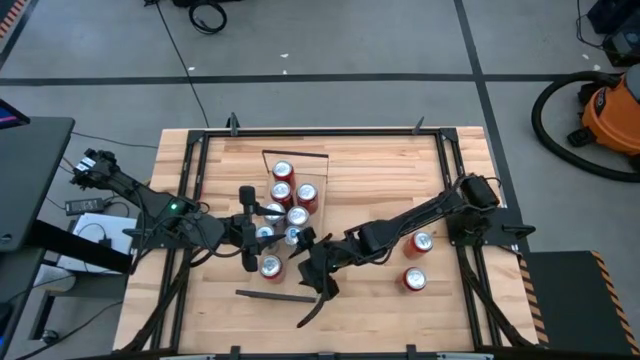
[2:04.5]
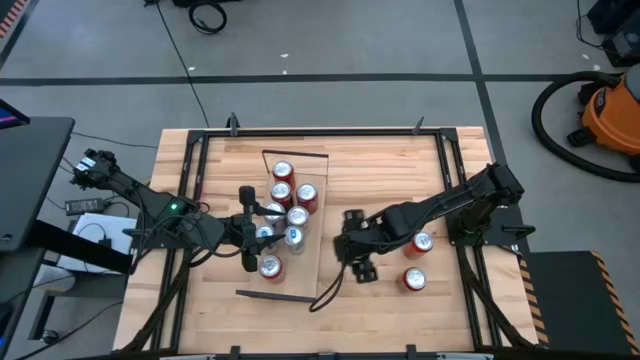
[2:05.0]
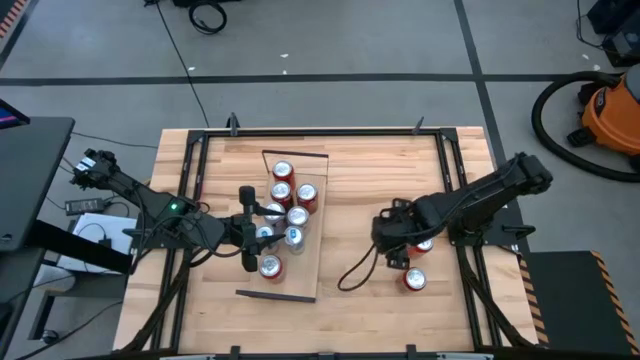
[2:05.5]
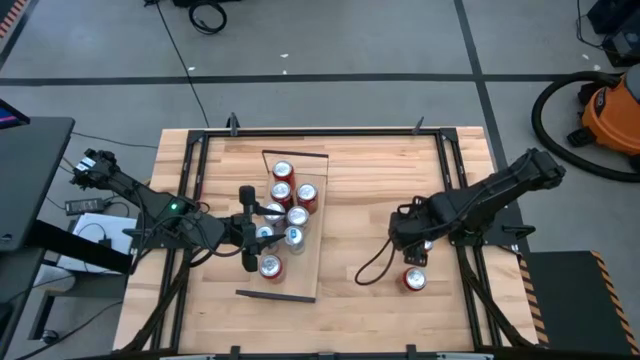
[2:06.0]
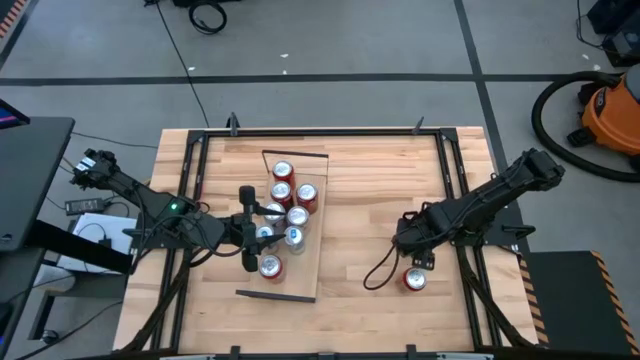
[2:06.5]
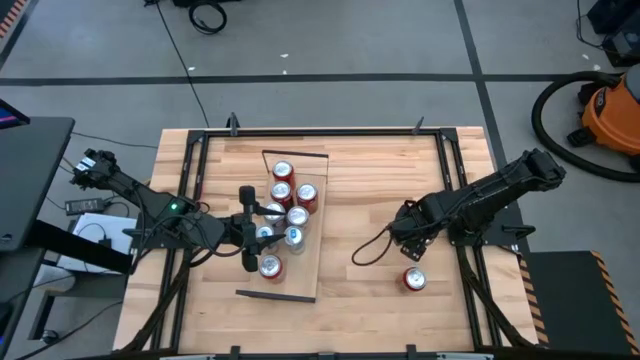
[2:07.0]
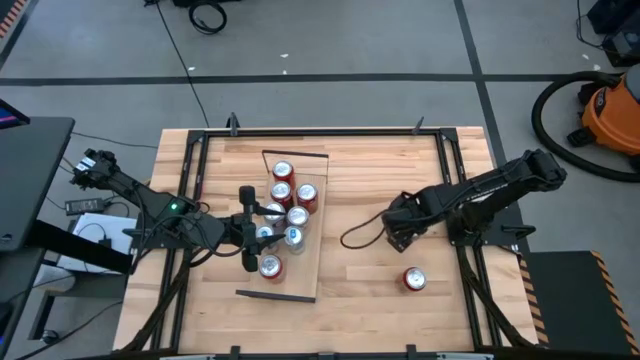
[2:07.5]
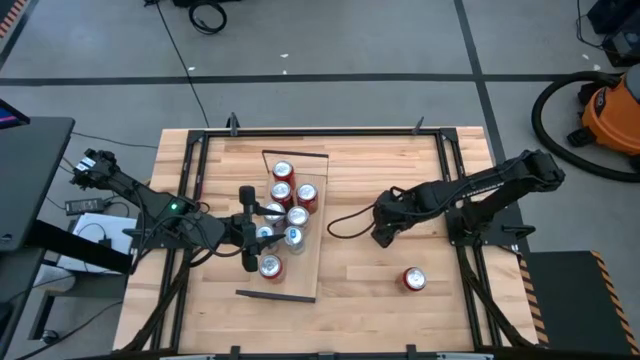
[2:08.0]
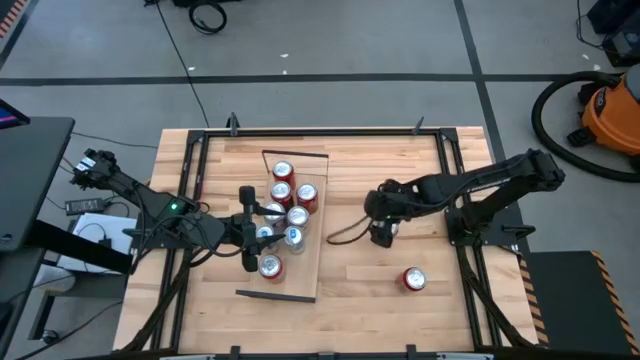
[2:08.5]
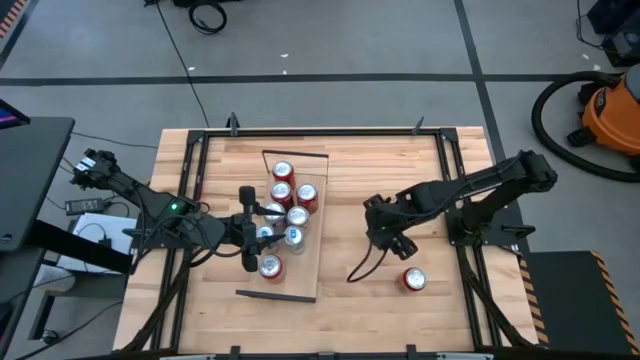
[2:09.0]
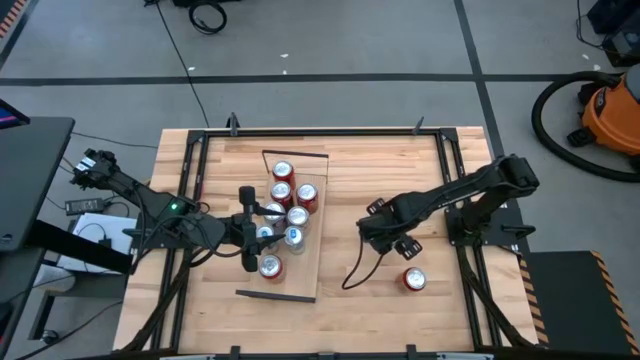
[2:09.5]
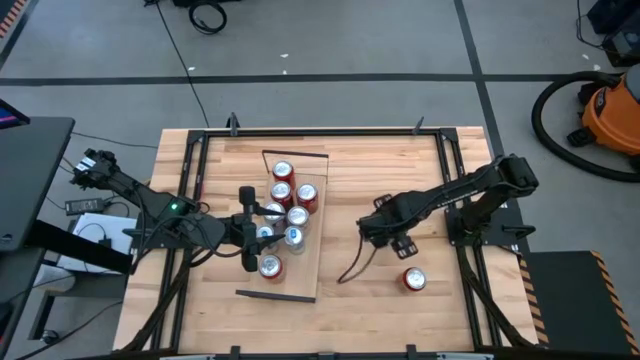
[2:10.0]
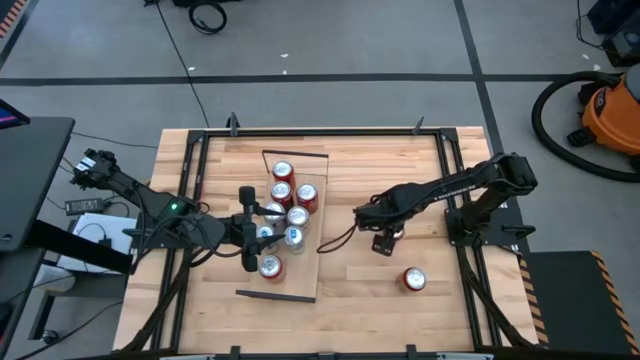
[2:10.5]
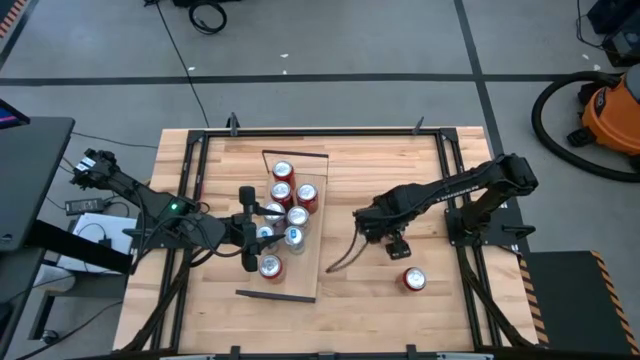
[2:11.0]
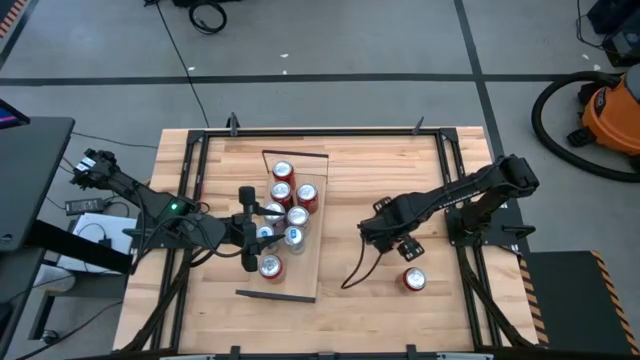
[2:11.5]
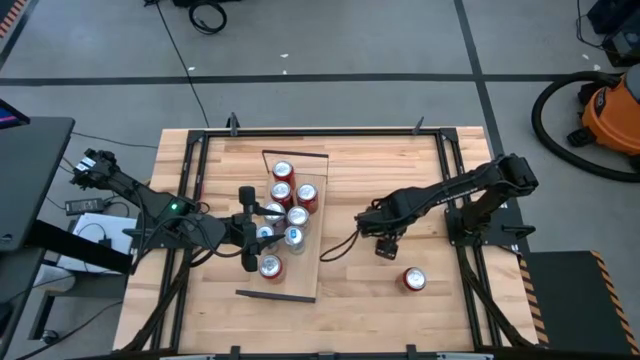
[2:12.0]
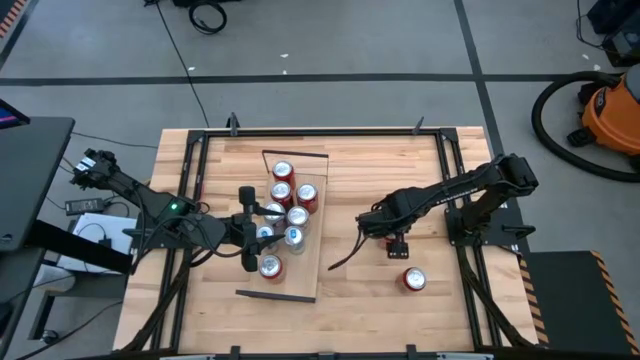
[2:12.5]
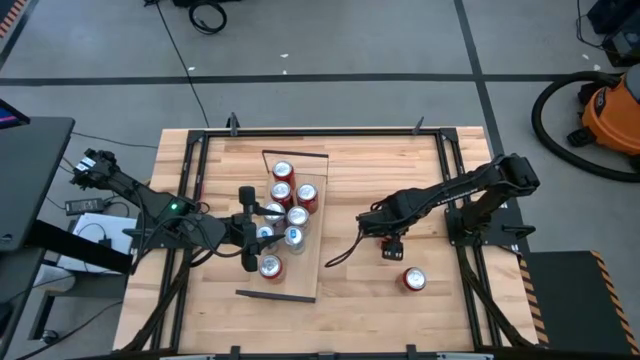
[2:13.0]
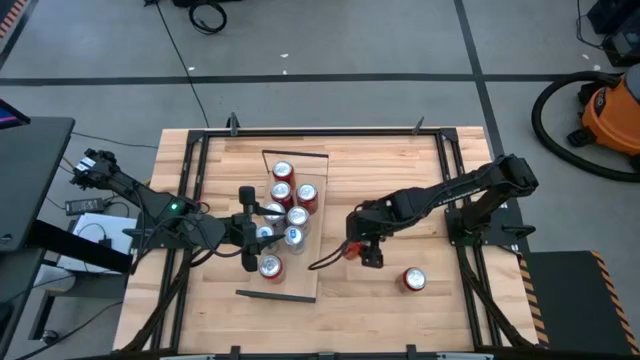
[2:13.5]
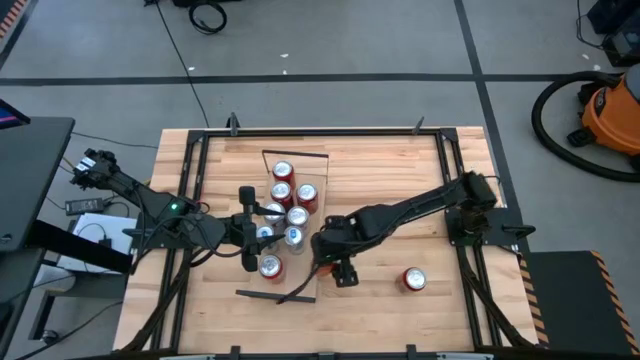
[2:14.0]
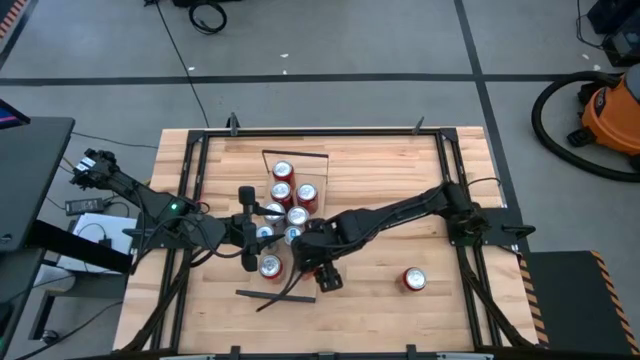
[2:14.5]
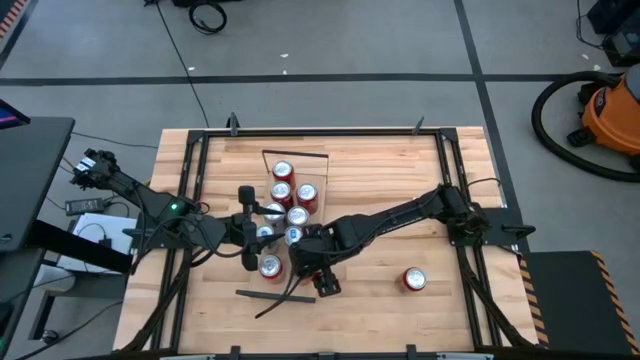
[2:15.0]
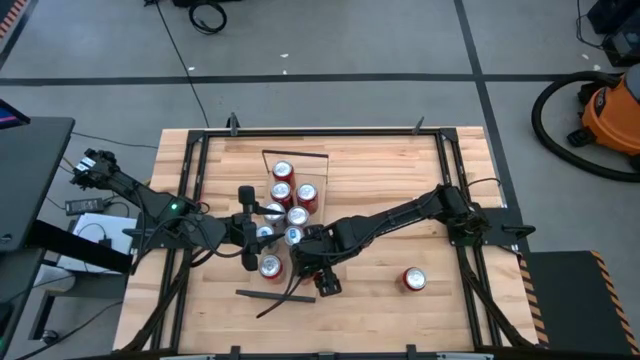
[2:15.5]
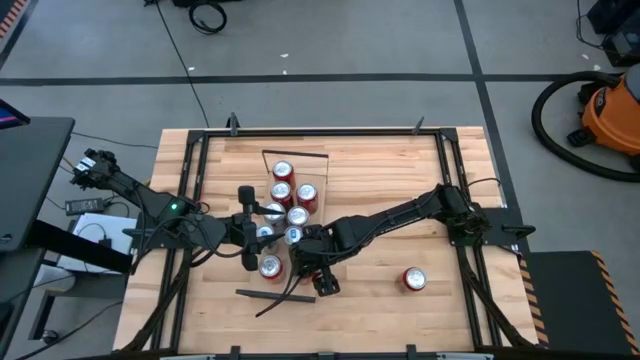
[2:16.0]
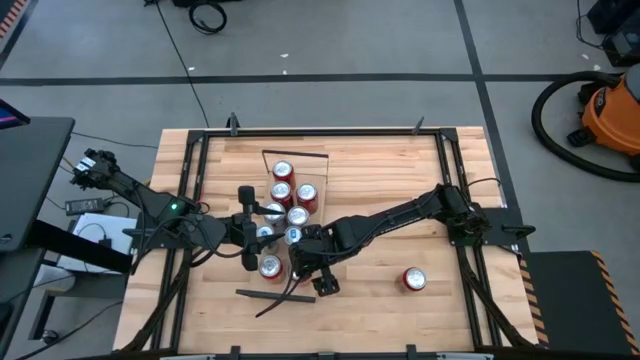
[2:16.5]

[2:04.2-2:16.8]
Task: Place canned beverage on shelf
Put the red soda can on the shelf aligned with the red soda can

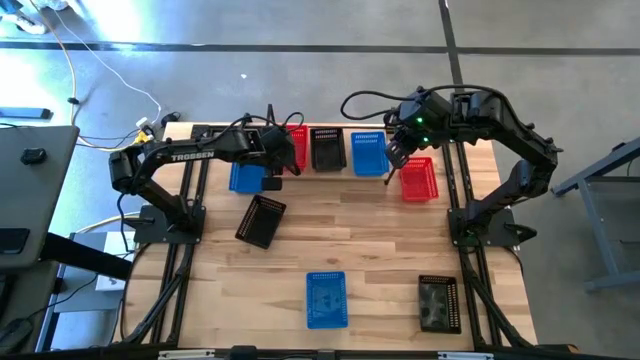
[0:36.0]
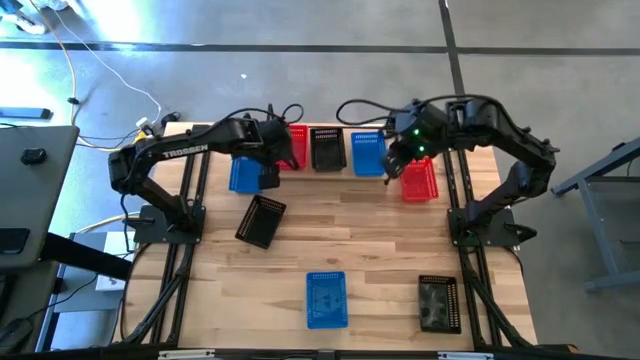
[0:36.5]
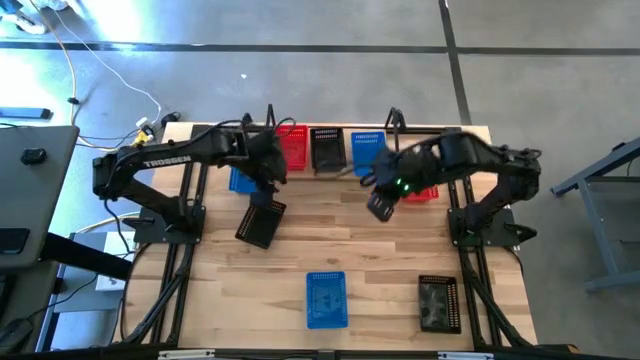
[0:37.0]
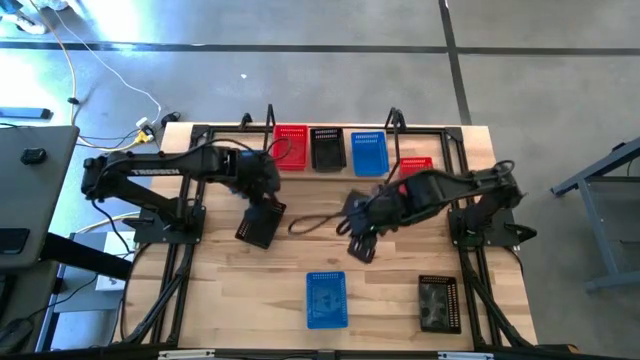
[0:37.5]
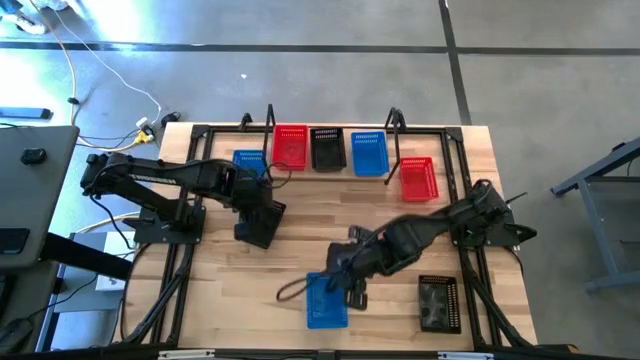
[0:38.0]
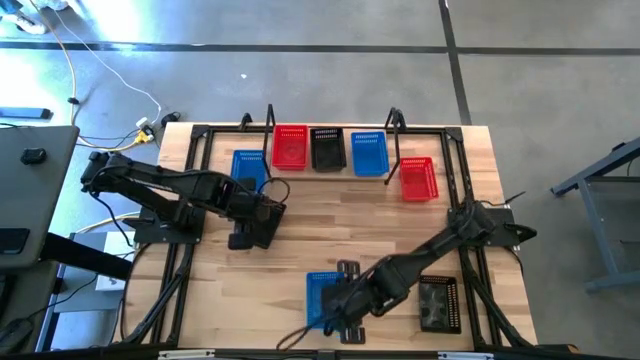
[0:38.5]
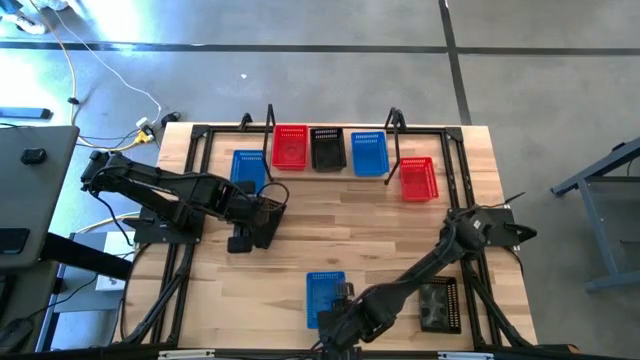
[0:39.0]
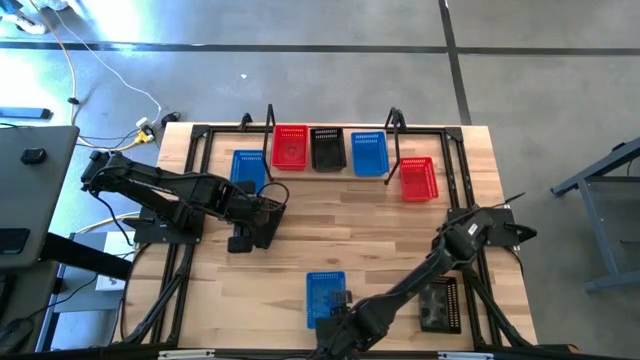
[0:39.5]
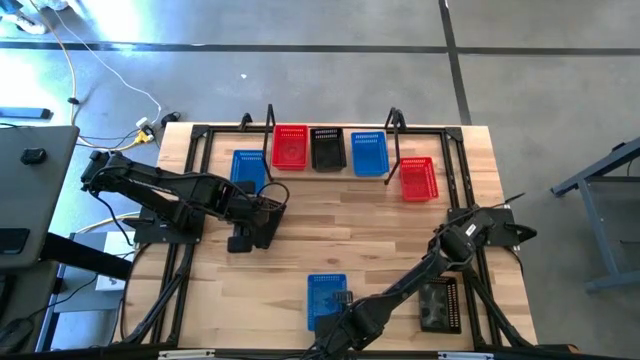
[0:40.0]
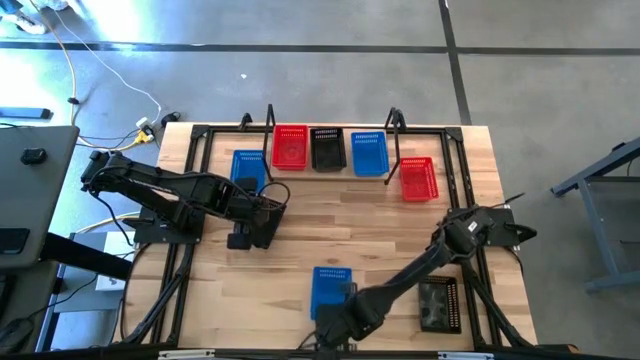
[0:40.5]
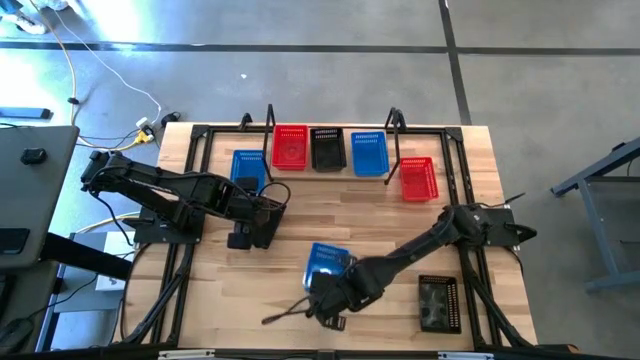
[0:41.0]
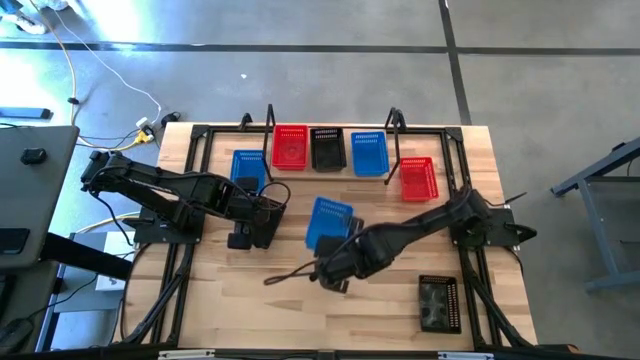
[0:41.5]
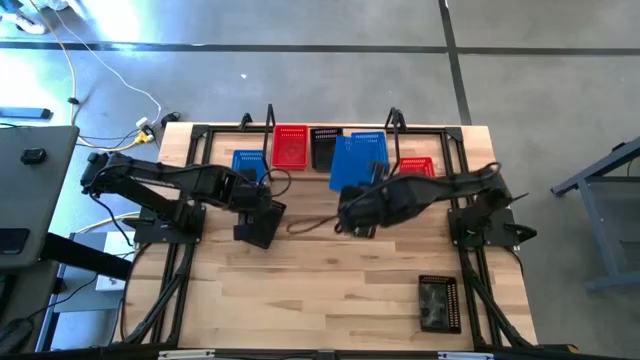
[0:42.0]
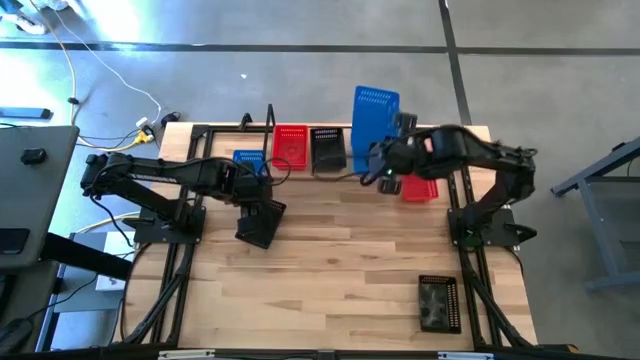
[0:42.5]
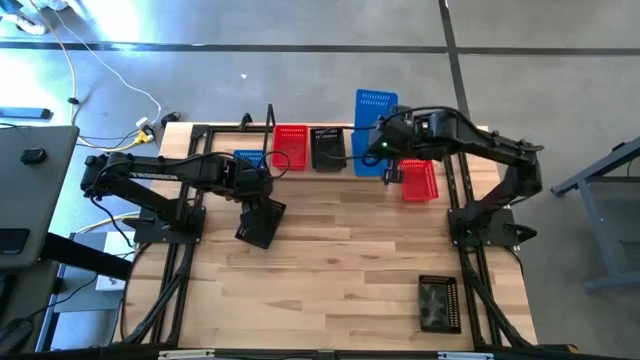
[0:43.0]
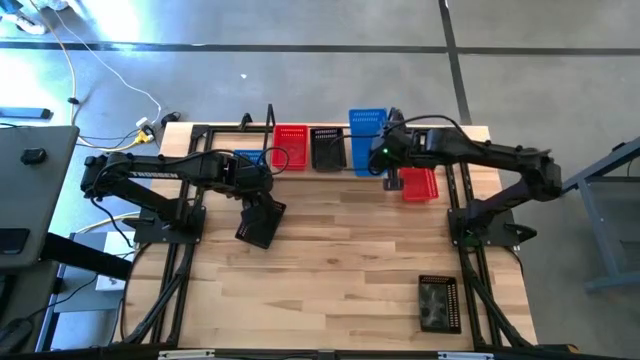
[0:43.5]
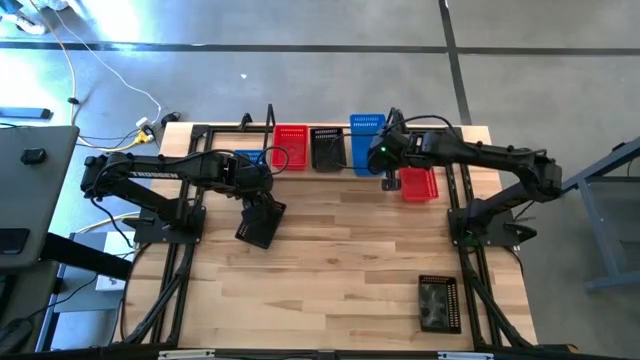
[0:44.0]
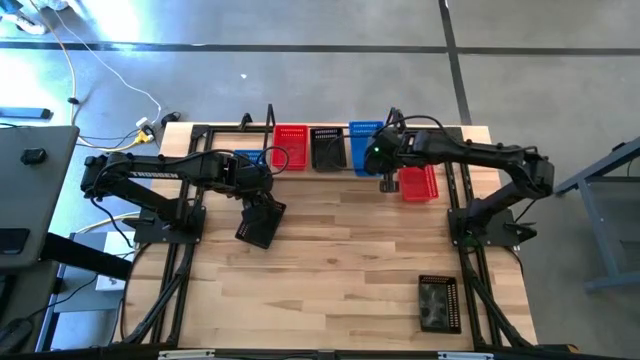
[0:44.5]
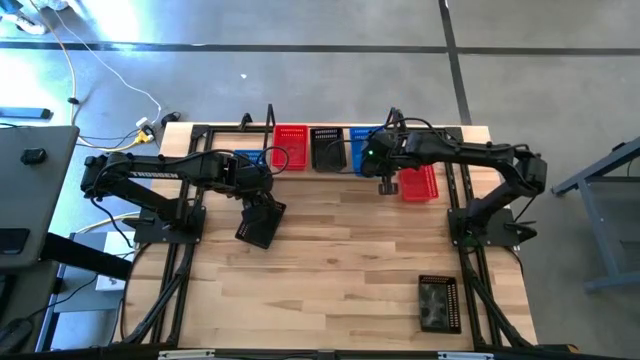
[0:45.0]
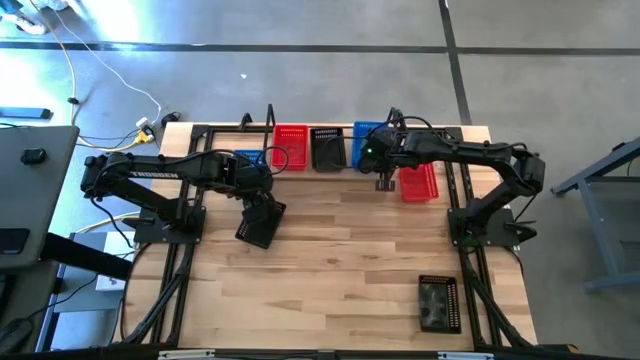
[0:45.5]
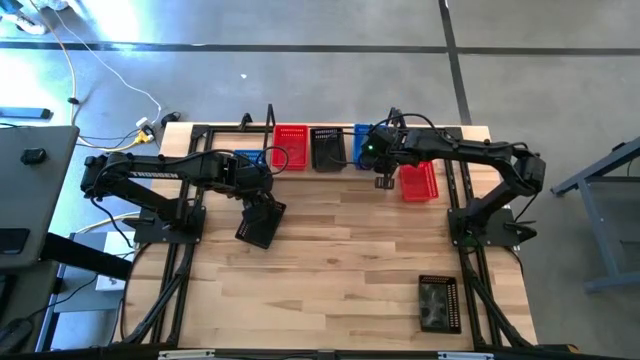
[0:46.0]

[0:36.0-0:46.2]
Task: Stack baskets on shelf by color
Stack the bottom blue basket on top of the blue basket on the shelf
